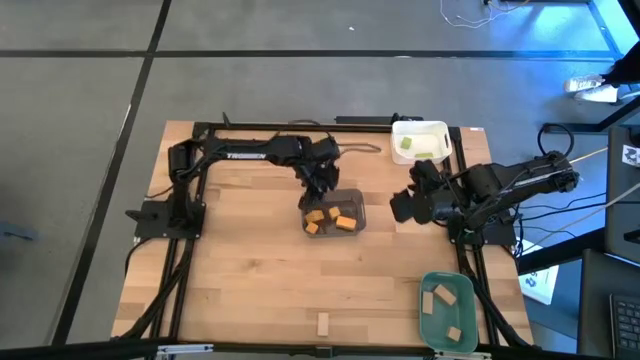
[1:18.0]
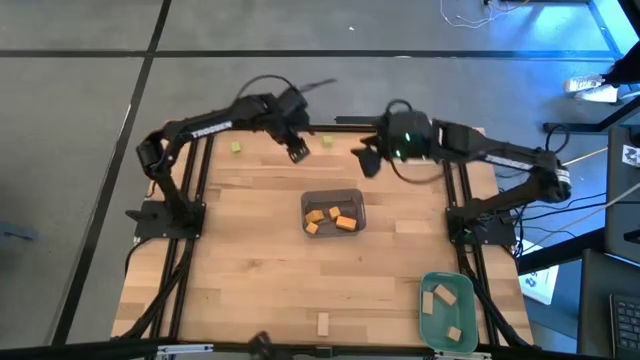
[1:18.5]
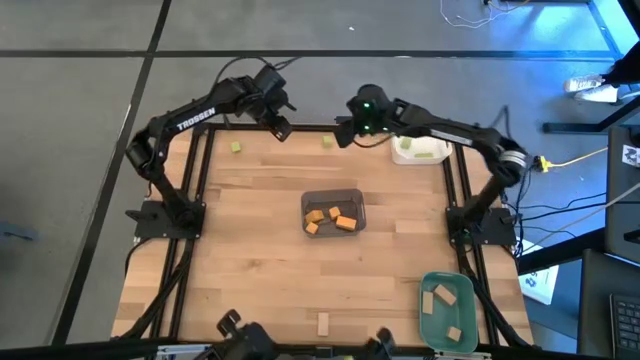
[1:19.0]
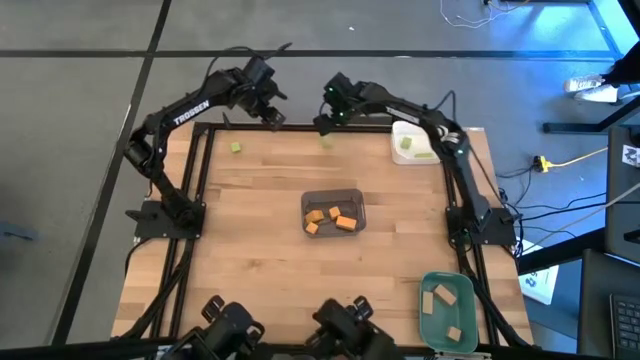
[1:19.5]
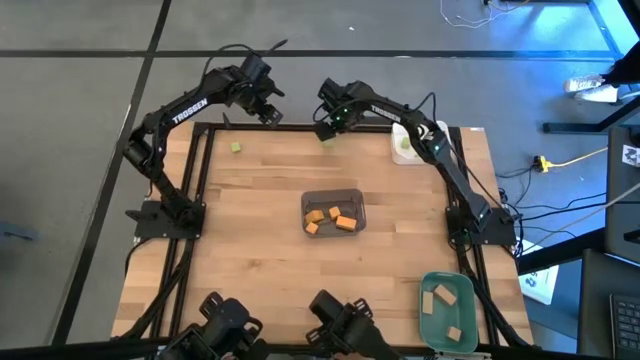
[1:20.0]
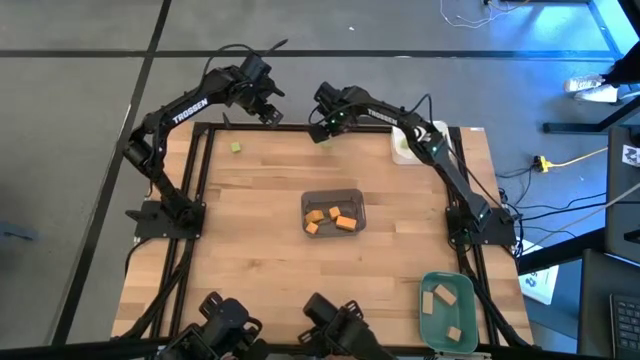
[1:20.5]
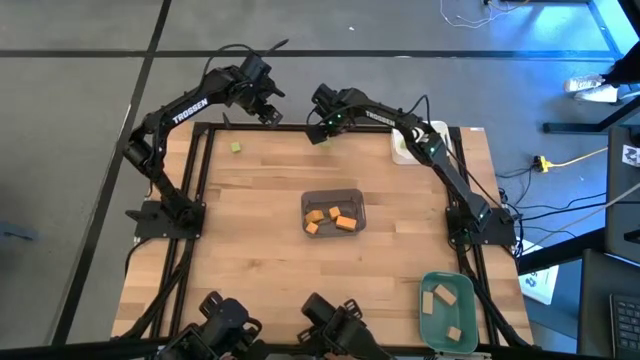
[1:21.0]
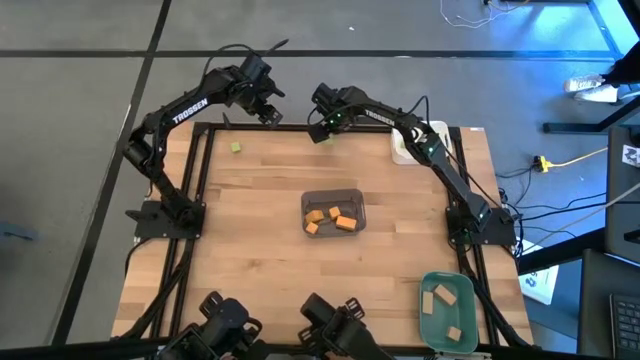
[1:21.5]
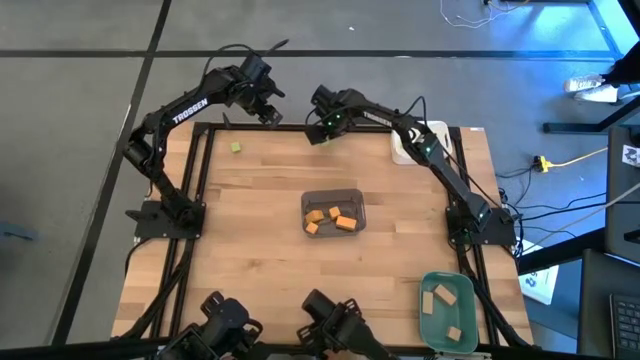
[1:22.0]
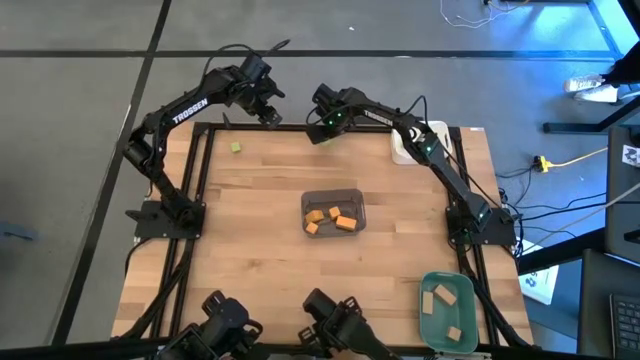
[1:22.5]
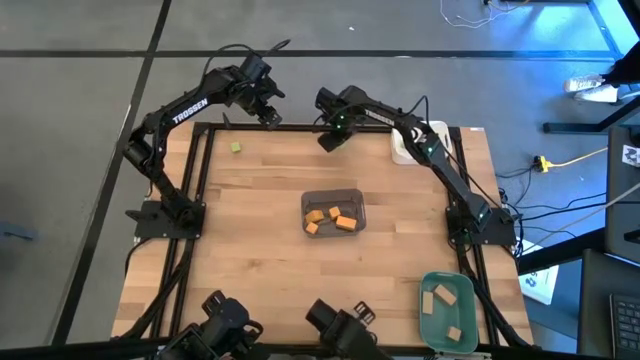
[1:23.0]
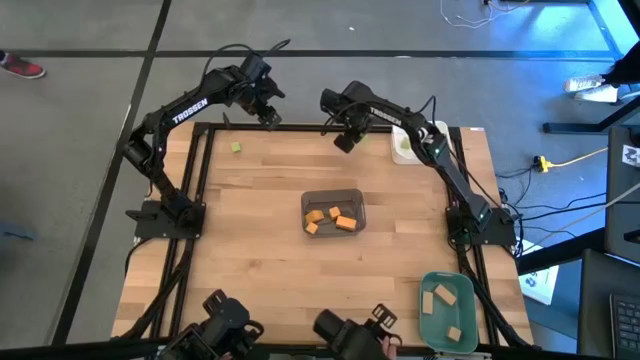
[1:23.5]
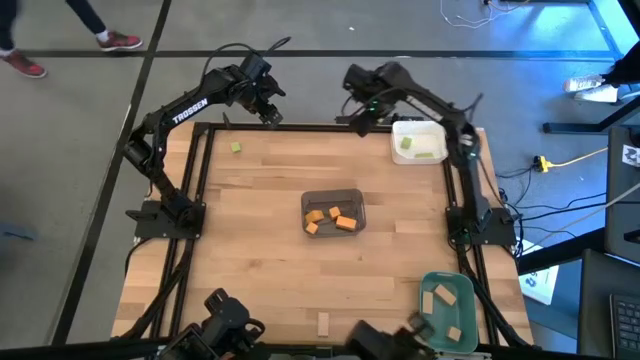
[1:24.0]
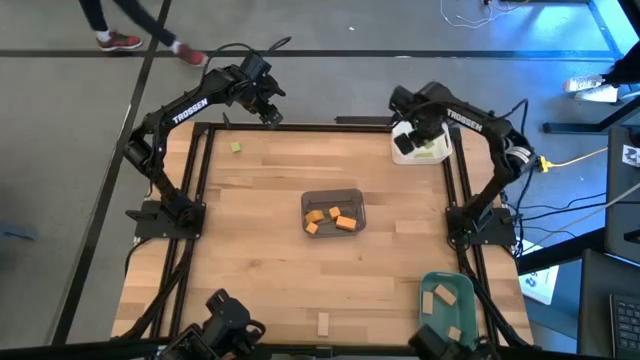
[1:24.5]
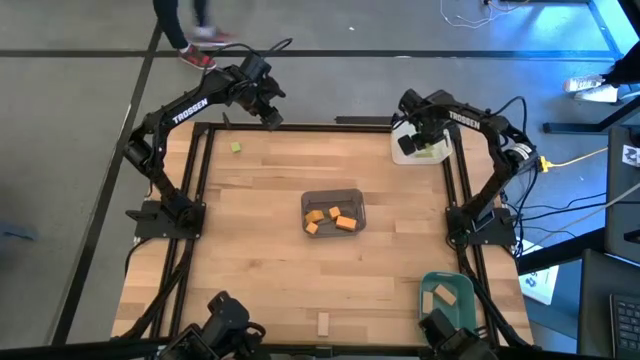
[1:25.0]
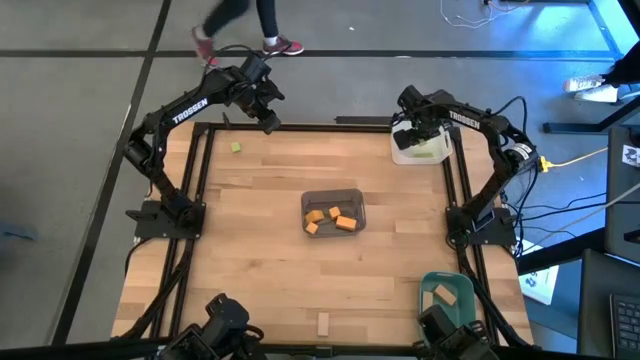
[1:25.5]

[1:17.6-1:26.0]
Task: Sort & place blocks by color
Put the green block into the white bin

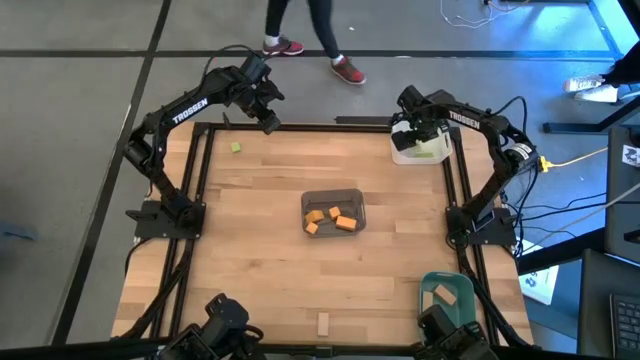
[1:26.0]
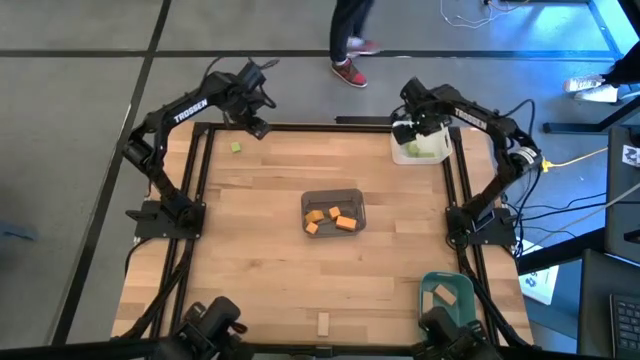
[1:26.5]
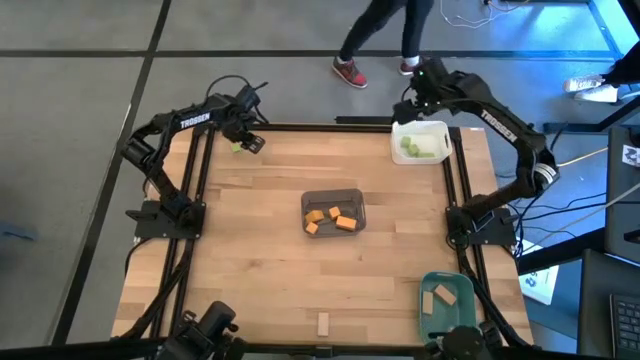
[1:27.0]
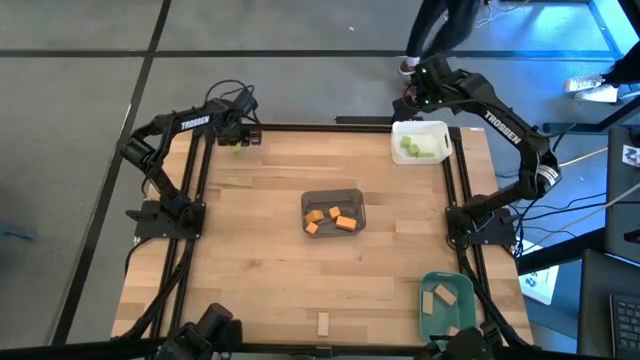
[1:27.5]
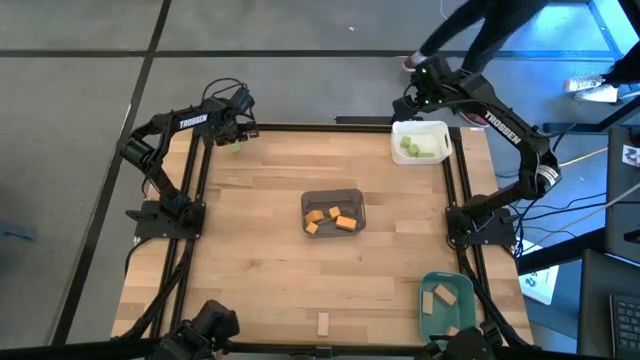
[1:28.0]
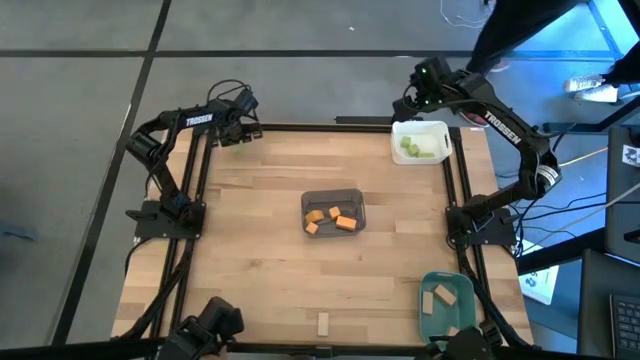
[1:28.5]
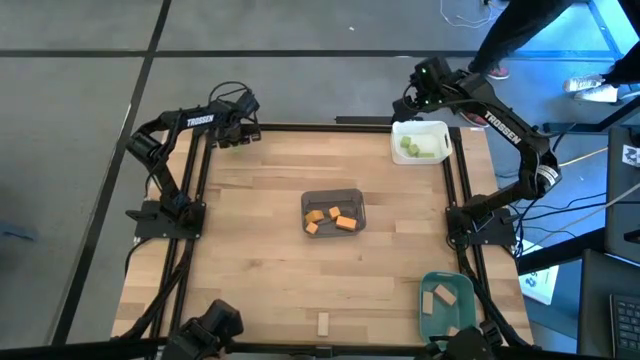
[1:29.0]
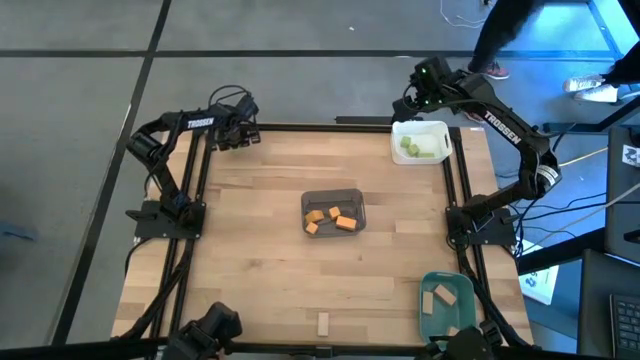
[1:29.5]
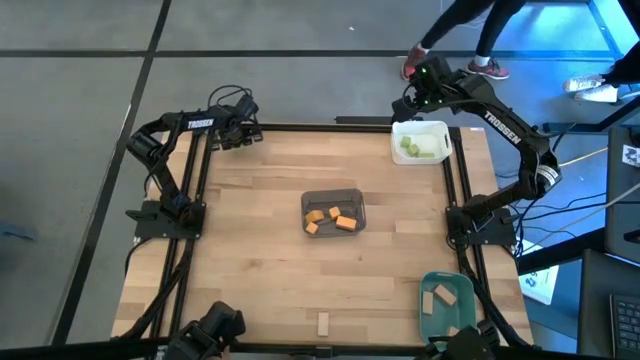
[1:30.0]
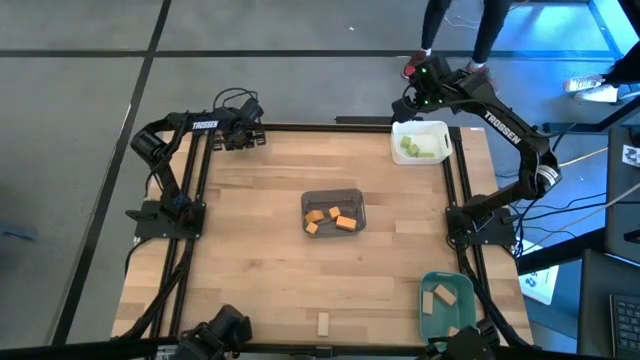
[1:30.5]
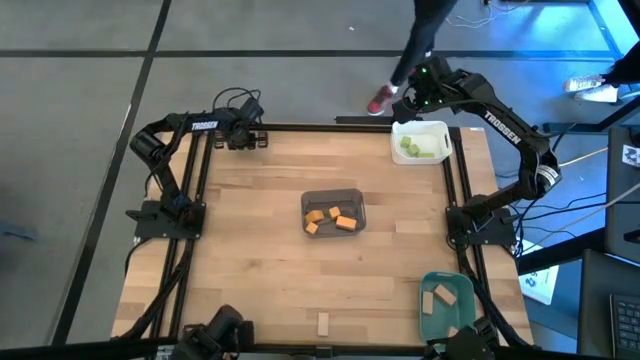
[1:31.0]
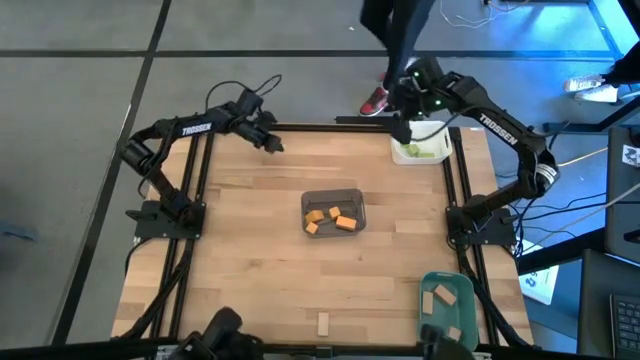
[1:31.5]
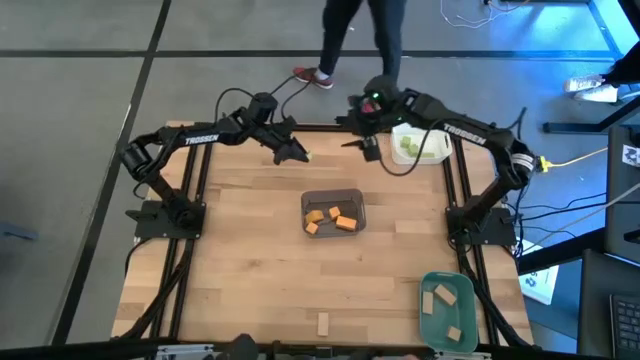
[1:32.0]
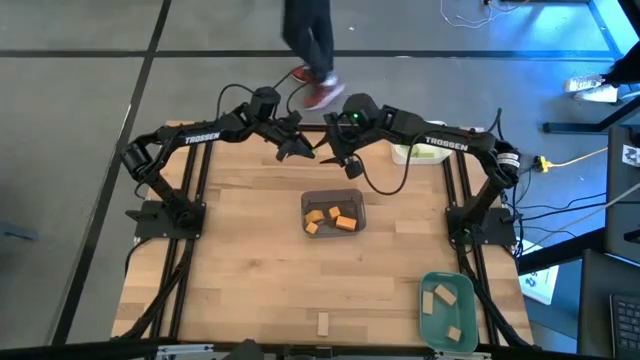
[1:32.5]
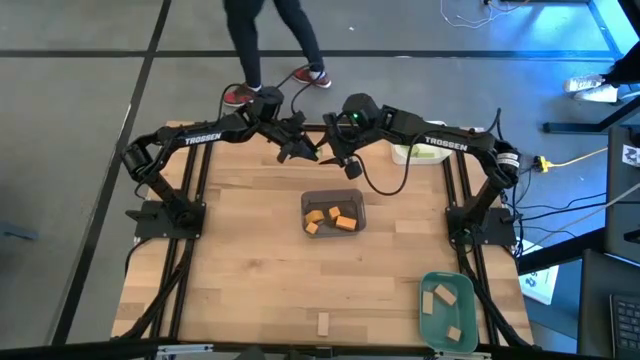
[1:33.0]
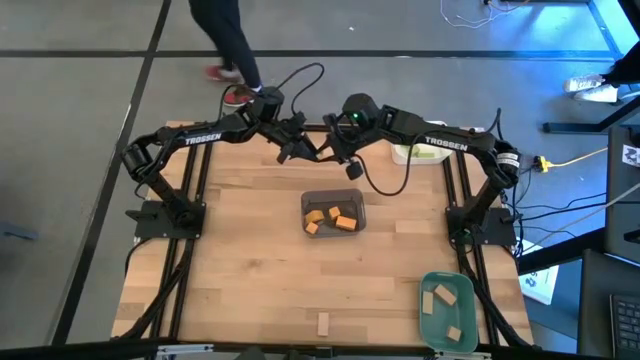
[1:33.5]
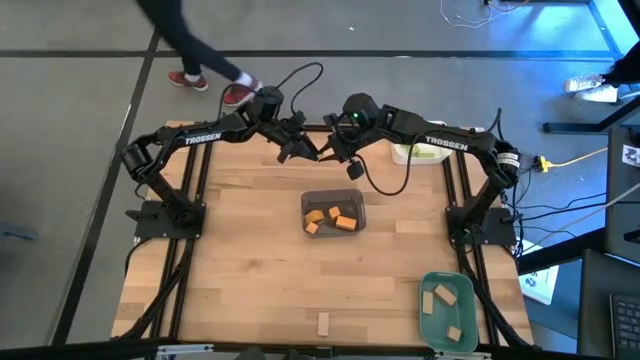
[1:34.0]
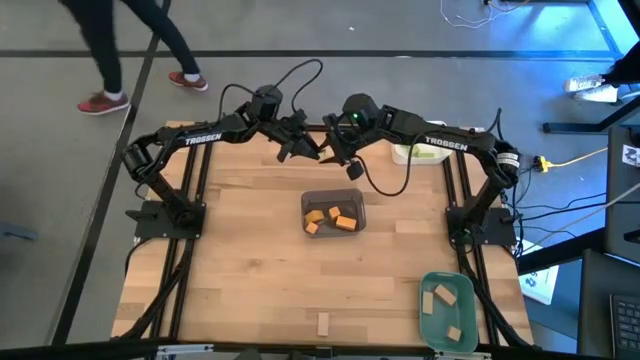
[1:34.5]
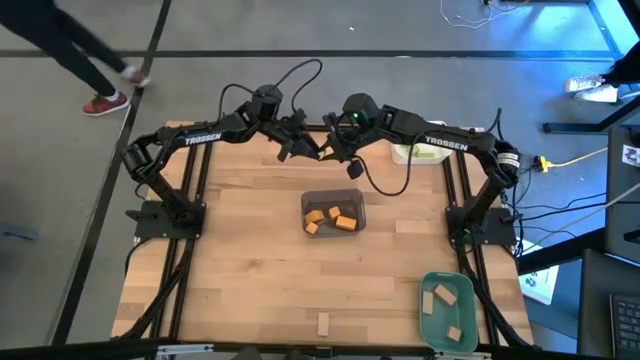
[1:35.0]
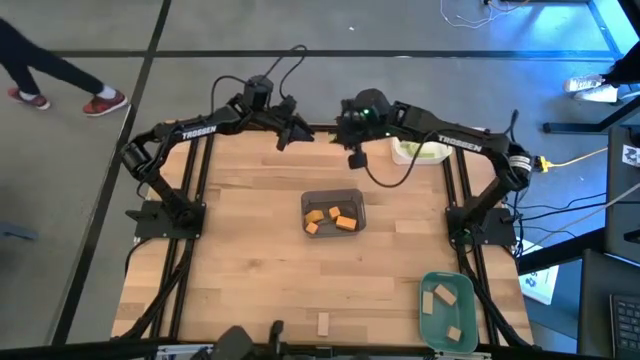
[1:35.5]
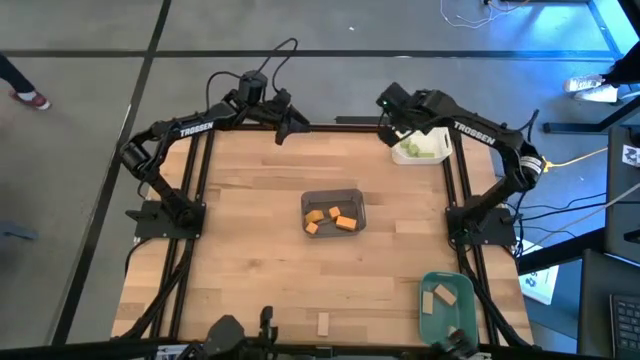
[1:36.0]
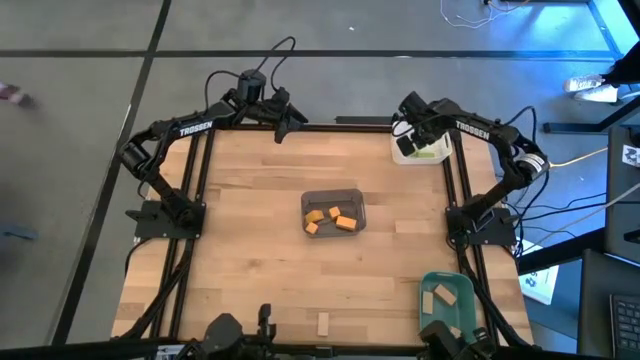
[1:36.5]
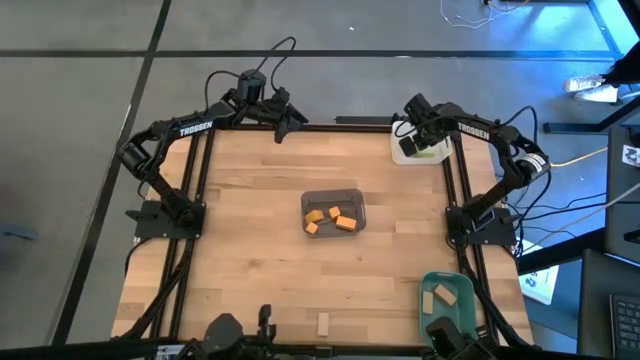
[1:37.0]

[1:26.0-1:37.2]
Put the green block in the white bin

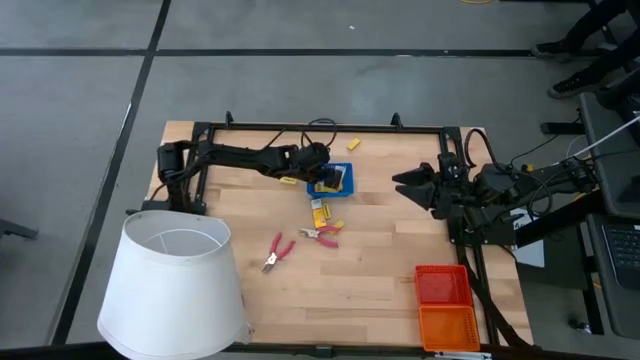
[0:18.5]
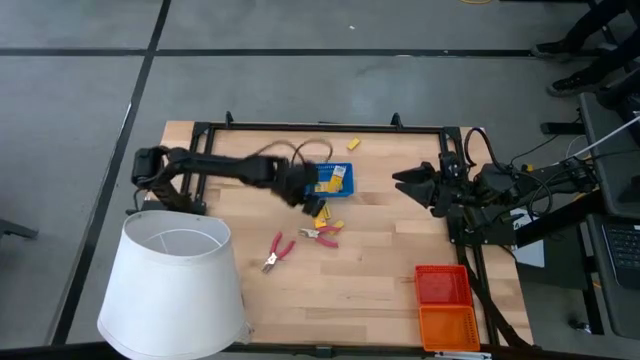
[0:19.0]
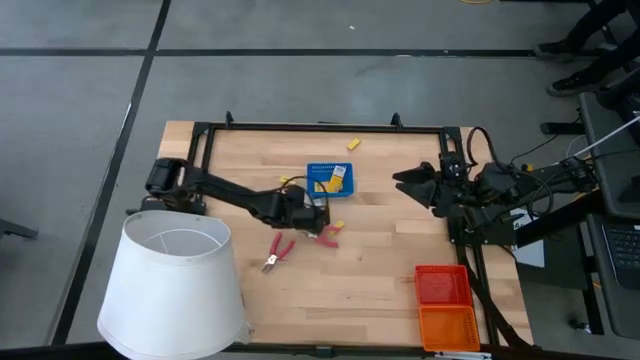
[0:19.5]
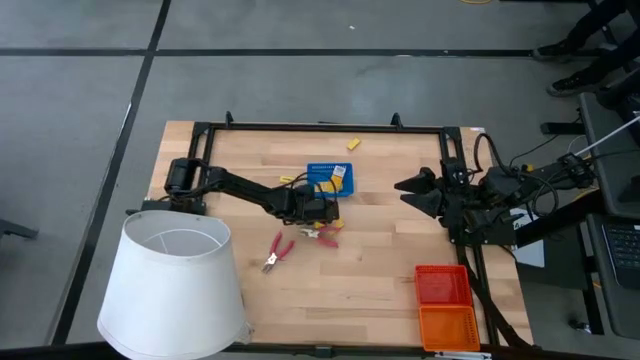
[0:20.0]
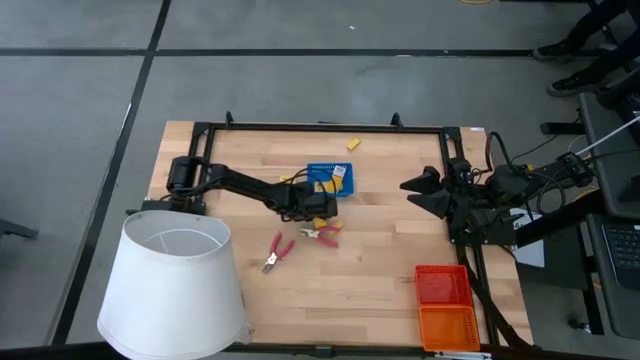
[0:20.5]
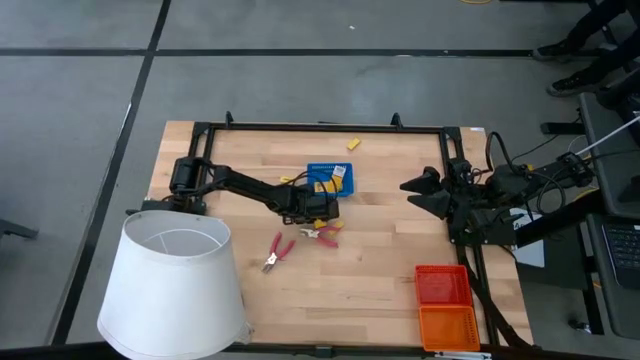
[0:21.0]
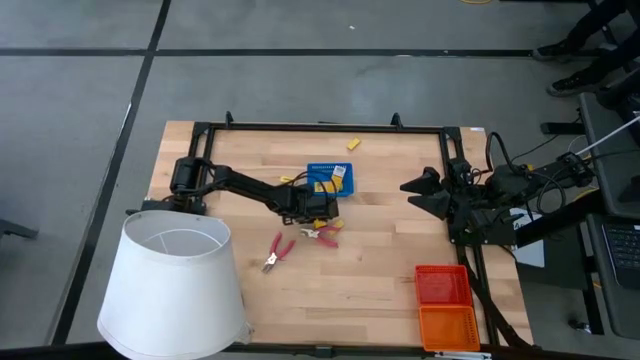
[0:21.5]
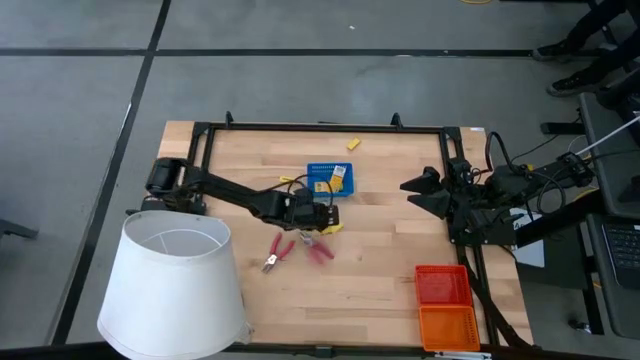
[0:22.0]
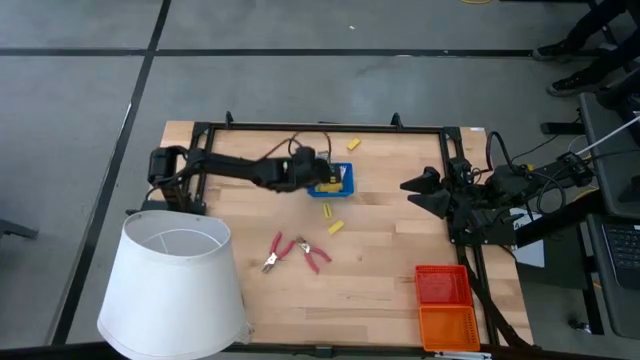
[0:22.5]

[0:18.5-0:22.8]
Task: Pick & Place School Supplies
Put the yellow crayon box into the blue bin
